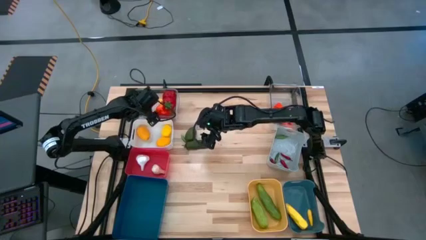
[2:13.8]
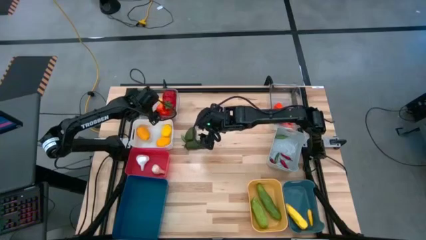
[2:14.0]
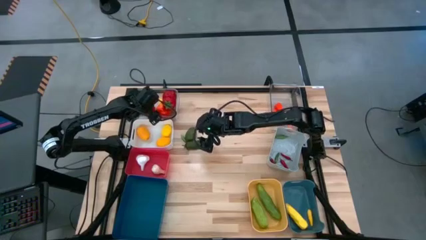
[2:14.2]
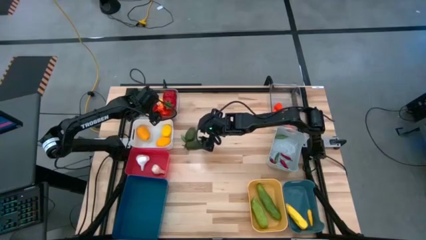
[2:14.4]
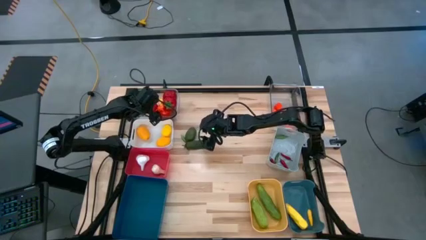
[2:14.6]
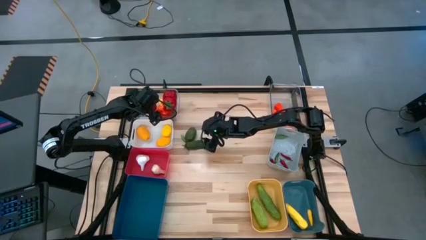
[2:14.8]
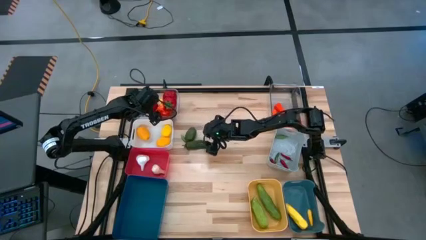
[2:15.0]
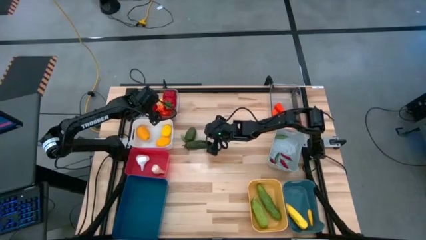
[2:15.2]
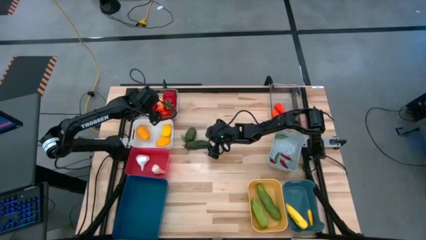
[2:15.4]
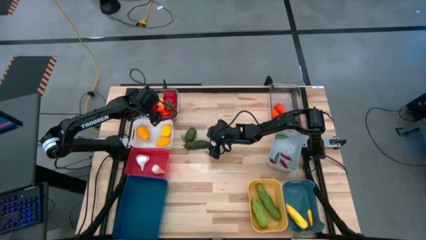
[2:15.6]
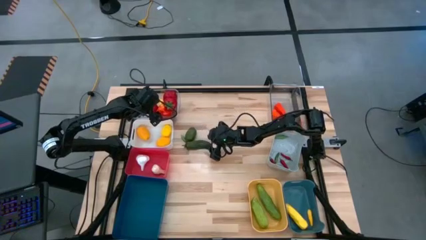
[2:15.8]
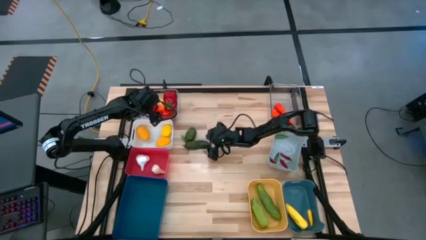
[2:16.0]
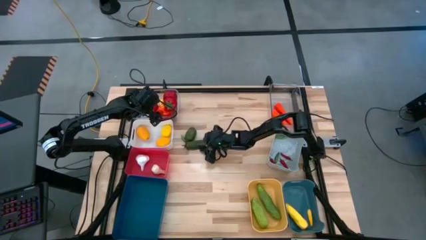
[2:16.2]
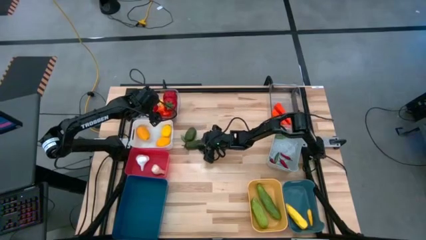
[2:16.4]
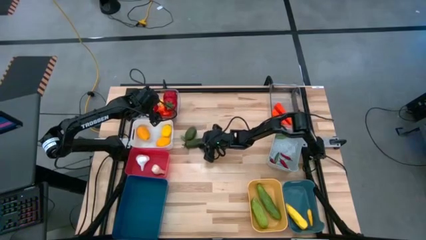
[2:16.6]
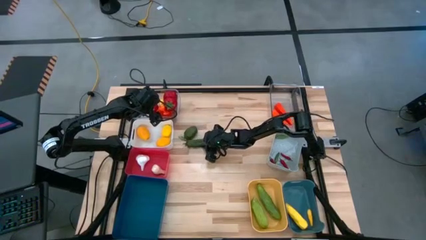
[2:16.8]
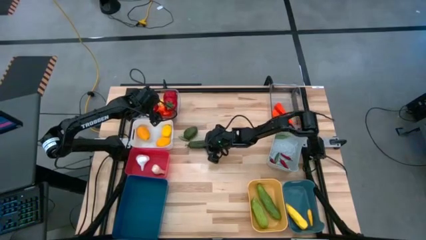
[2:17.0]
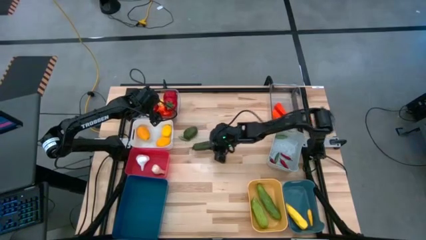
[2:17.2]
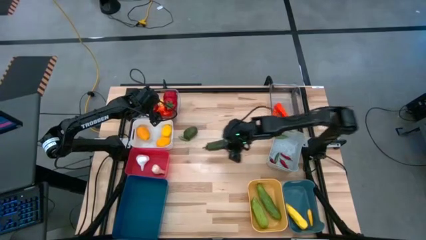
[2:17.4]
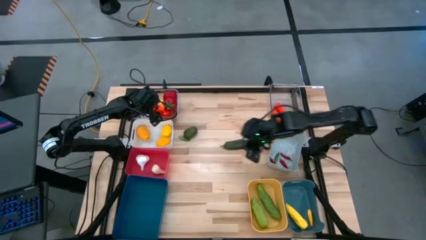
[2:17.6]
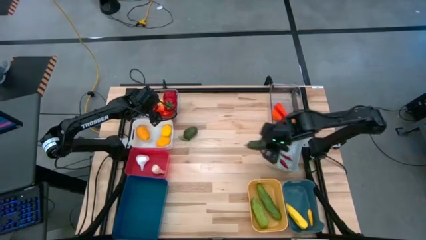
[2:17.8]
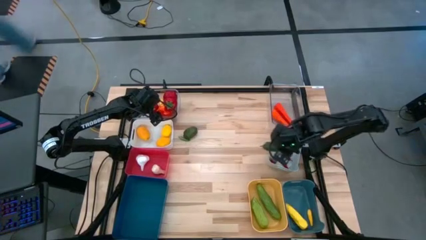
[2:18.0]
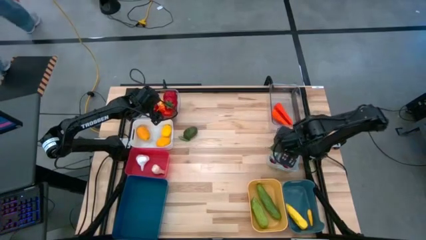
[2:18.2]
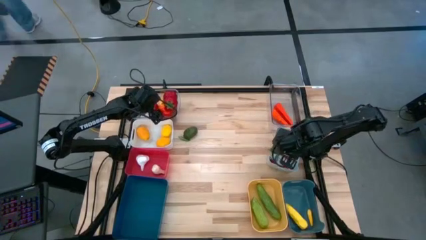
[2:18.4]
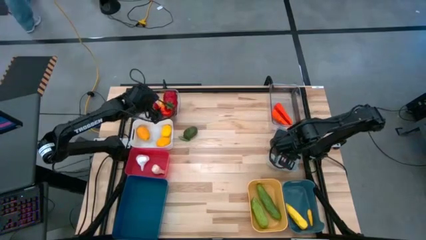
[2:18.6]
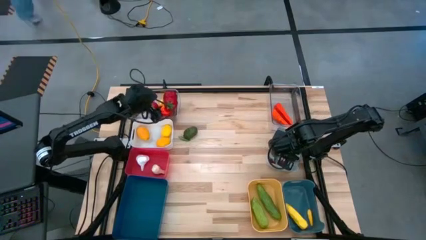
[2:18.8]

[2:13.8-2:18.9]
Task: Sort produce into baskets
Put the green chili pepper into the gray bin

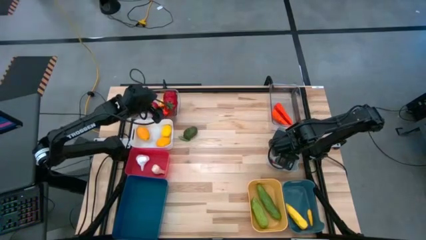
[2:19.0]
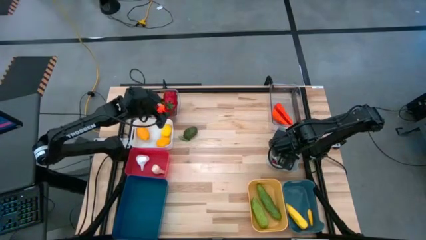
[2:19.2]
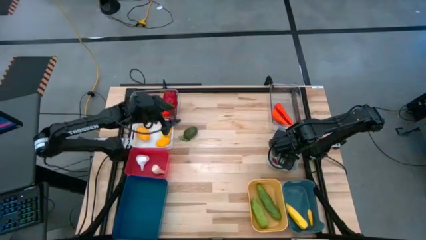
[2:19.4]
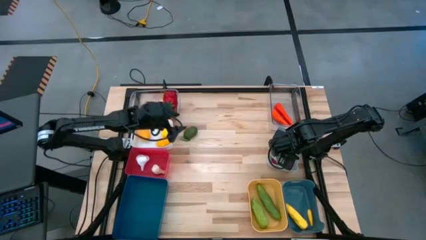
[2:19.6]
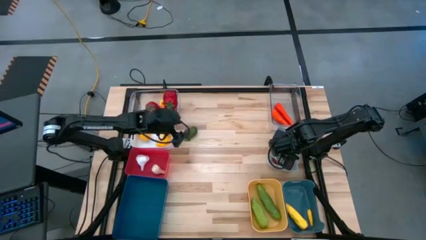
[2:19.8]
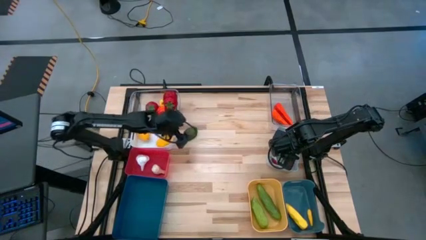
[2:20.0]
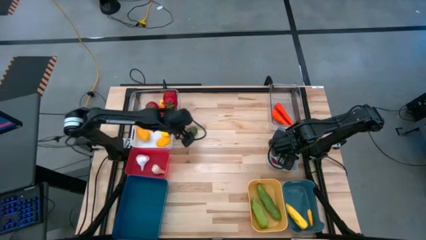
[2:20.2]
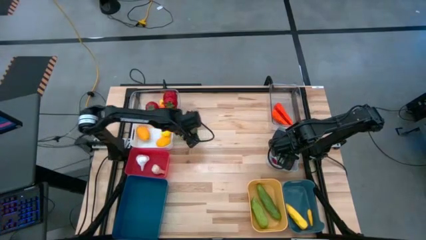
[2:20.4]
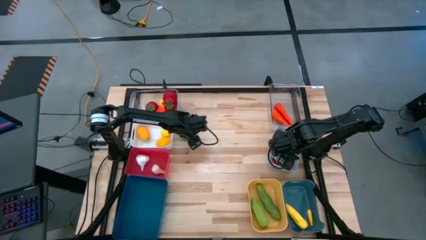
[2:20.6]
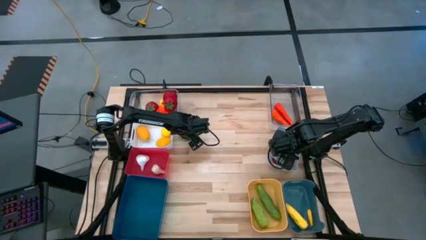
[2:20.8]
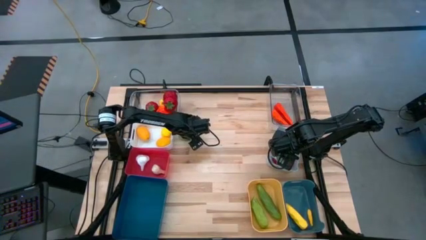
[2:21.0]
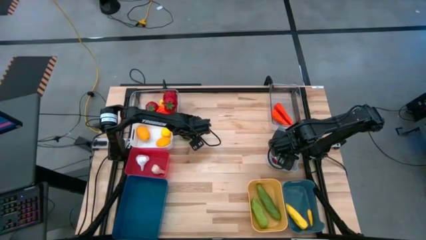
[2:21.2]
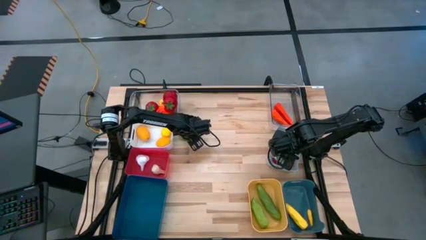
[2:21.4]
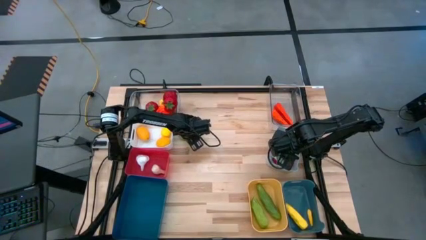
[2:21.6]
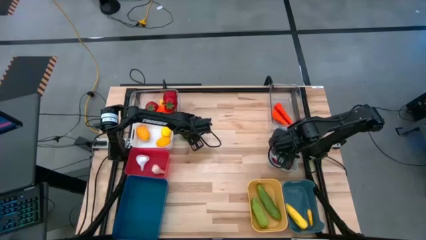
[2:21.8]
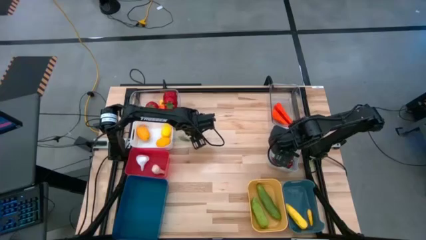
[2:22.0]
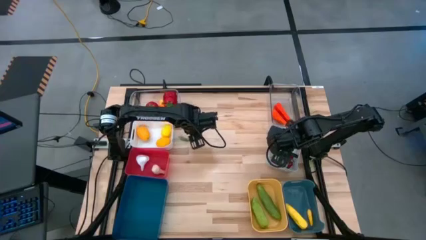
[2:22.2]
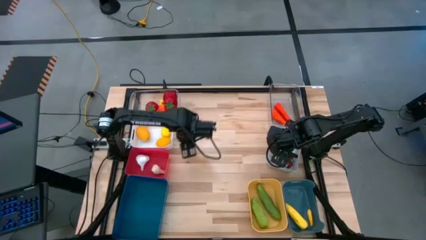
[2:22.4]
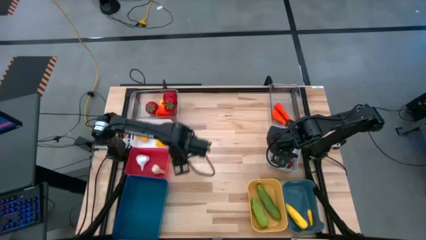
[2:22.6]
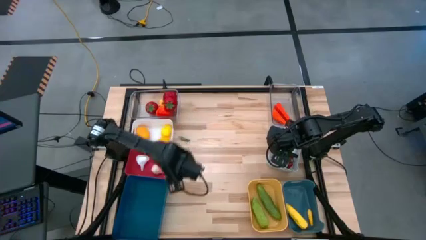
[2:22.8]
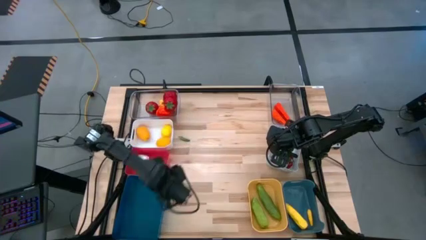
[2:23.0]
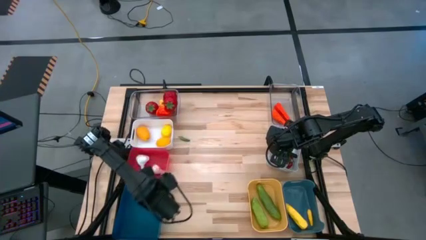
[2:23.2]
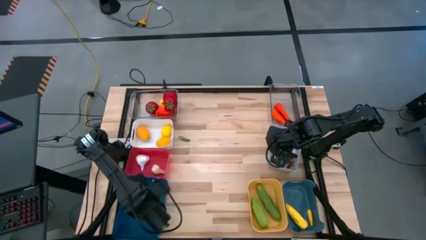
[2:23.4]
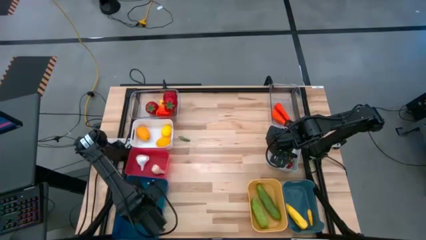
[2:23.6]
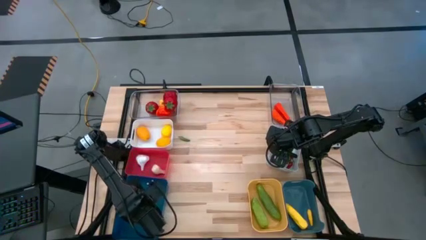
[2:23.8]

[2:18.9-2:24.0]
Put the green lime into the left blue bin

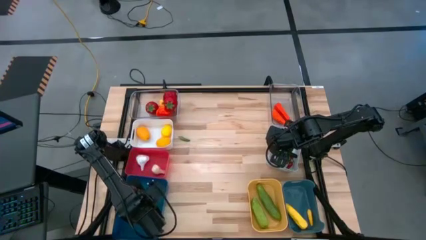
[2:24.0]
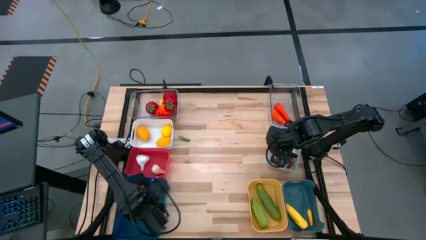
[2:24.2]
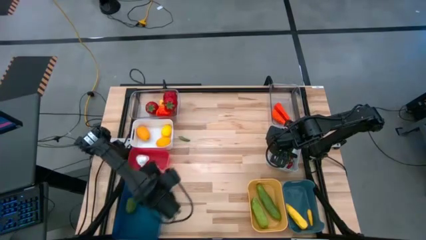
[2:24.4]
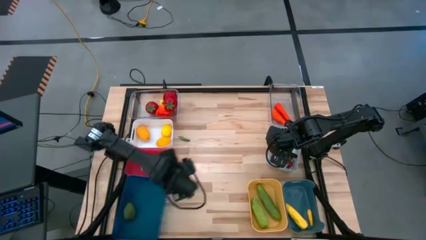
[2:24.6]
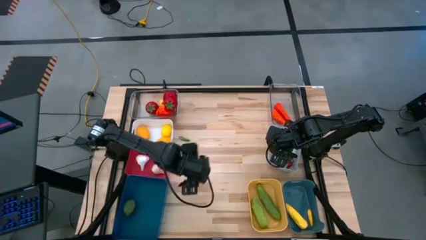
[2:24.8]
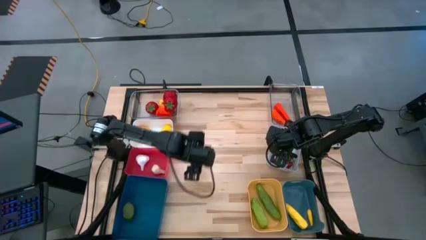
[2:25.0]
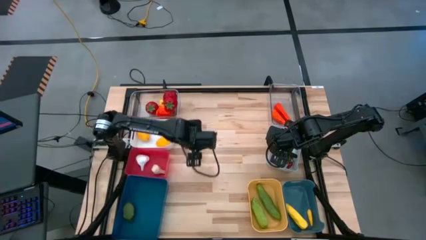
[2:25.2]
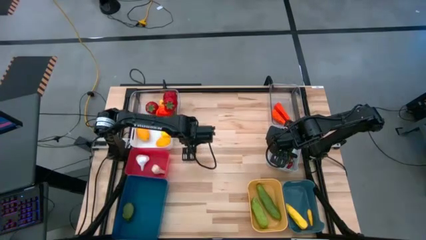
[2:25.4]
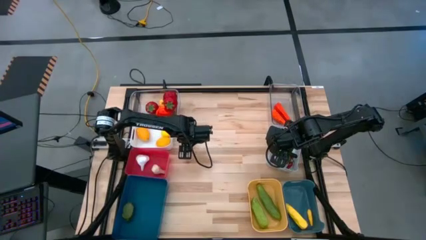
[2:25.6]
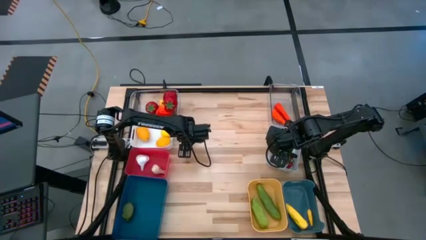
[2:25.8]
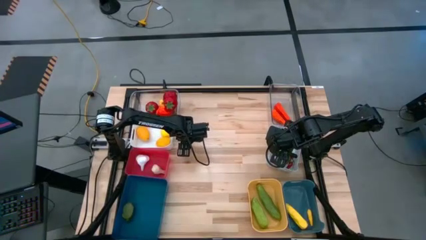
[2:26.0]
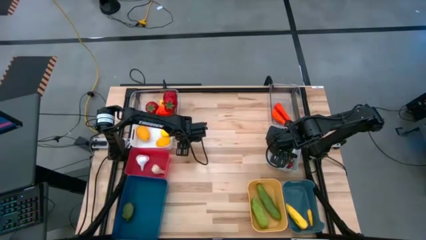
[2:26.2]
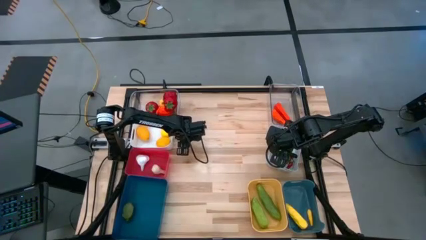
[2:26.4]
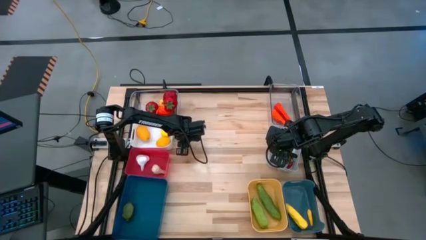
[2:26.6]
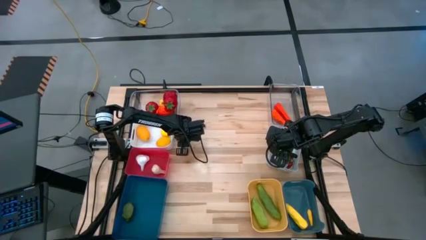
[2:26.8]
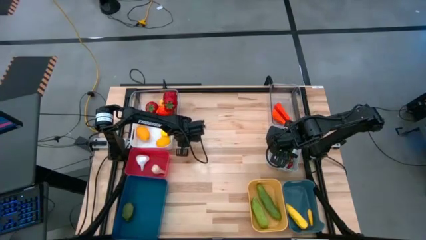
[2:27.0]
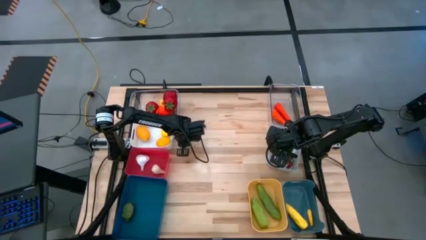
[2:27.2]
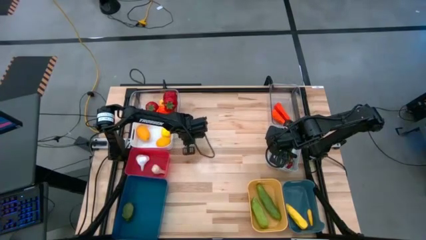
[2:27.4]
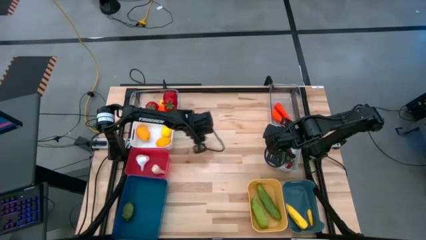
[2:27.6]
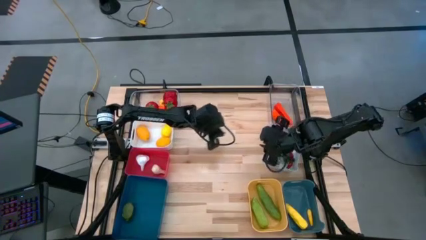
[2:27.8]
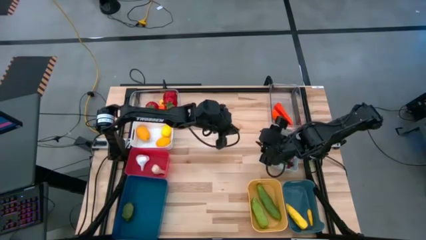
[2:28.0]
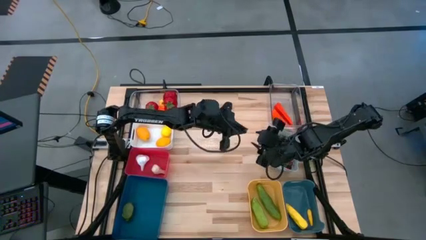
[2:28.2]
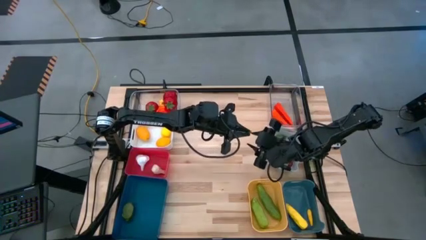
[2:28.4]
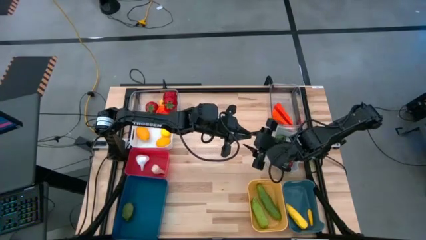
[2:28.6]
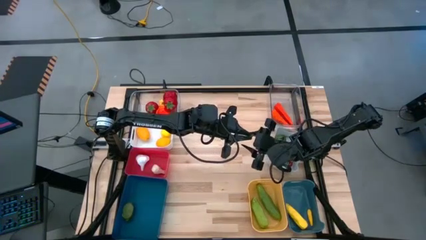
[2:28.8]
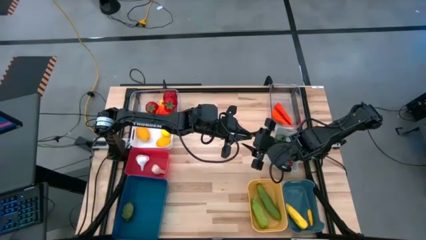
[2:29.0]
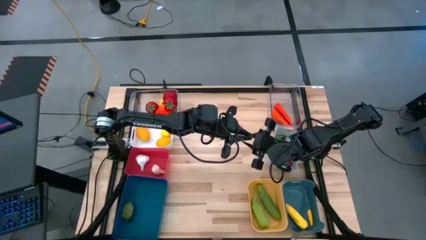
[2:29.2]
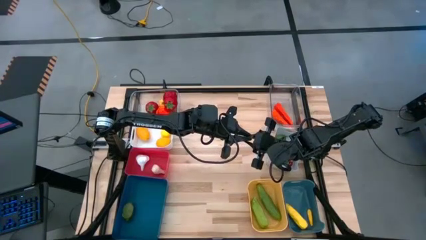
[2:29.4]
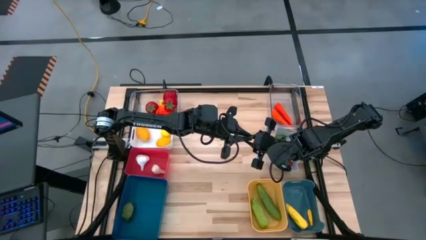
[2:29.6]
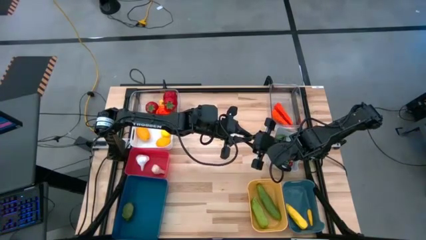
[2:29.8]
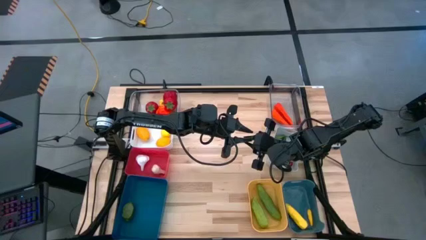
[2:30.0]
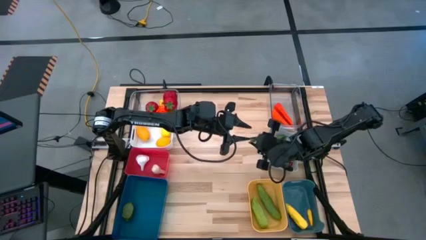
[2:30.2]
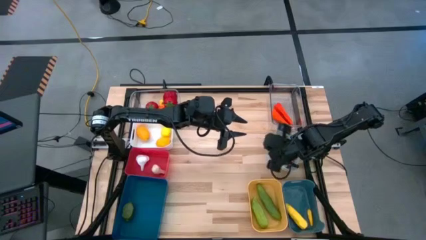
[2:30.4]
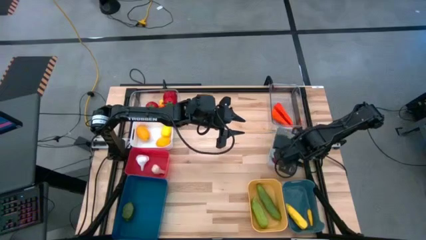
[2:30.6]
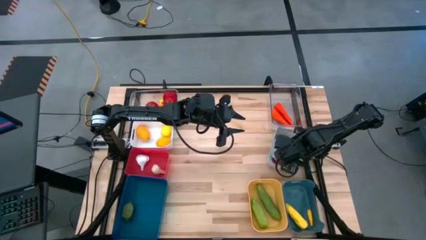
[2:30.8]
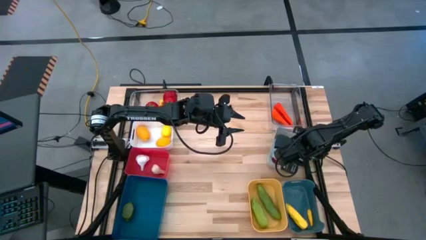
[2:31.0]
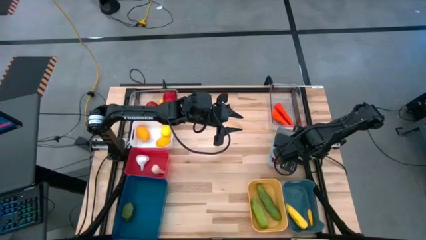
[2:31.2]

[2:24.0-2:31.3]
Put the green chili into the gray bin
